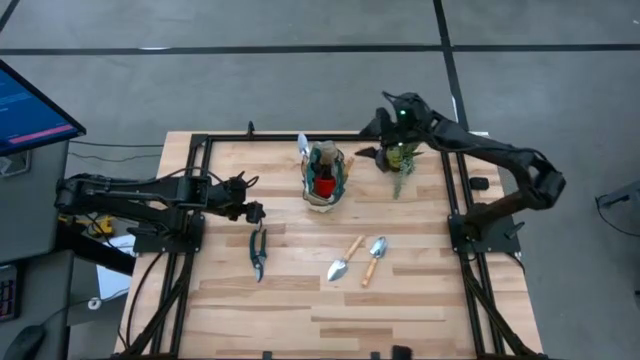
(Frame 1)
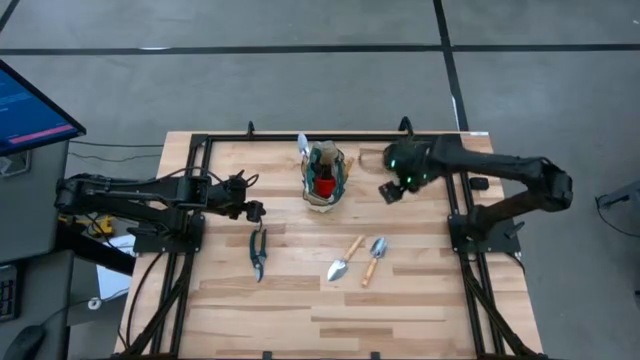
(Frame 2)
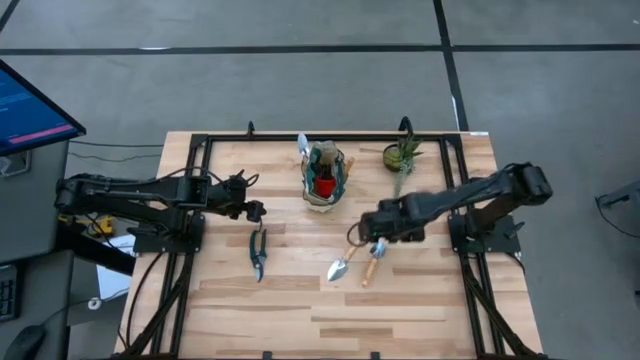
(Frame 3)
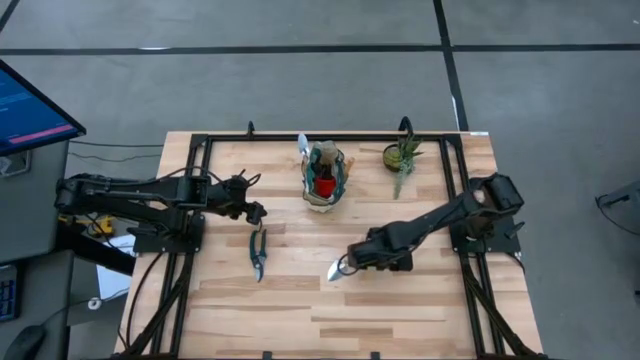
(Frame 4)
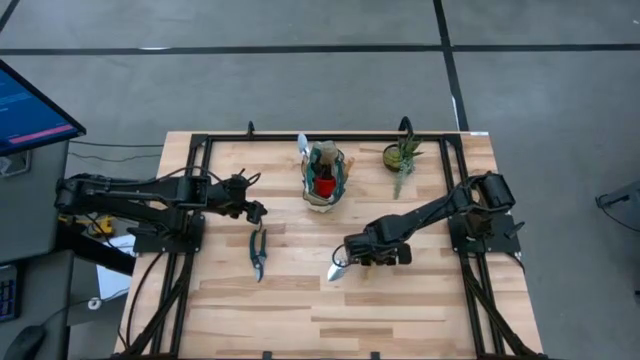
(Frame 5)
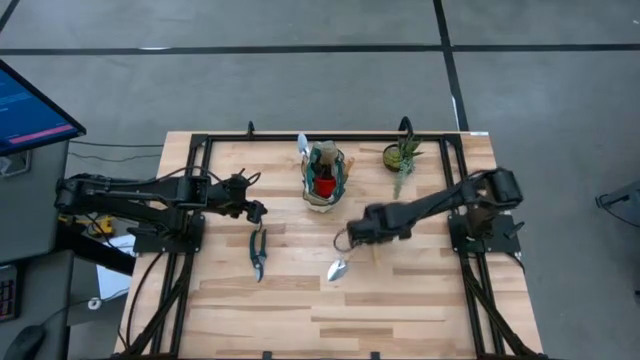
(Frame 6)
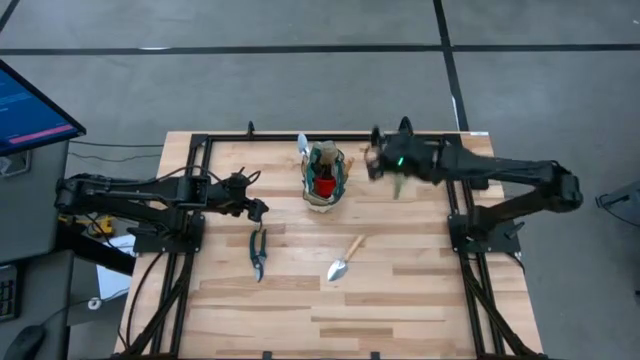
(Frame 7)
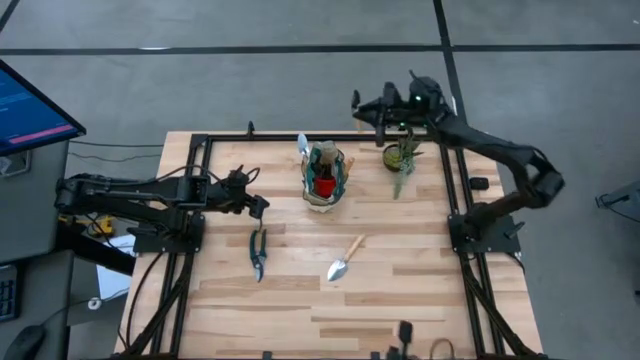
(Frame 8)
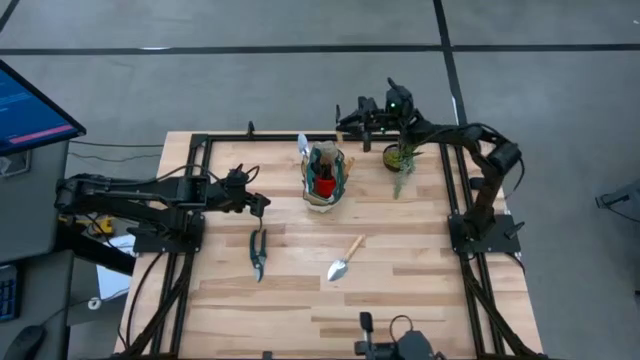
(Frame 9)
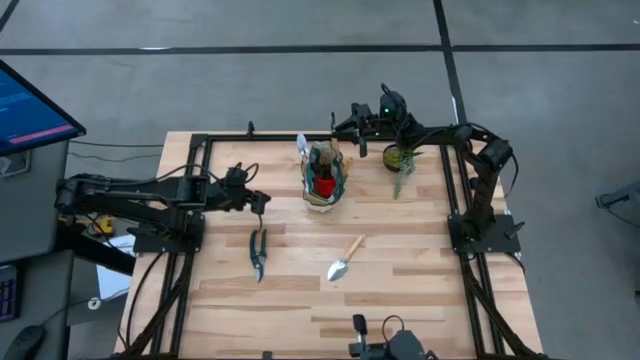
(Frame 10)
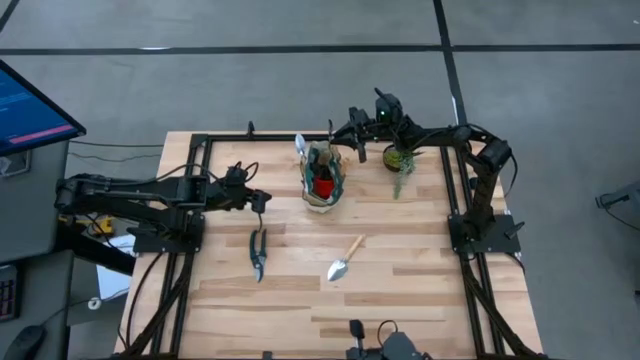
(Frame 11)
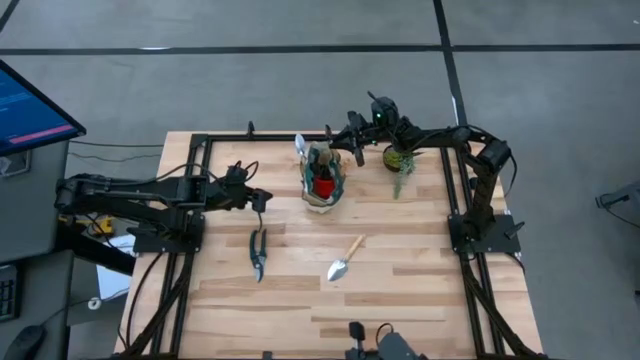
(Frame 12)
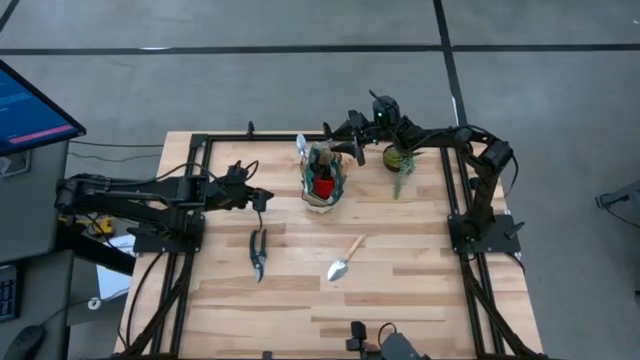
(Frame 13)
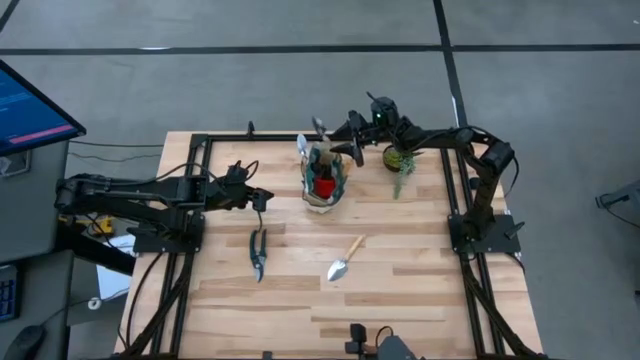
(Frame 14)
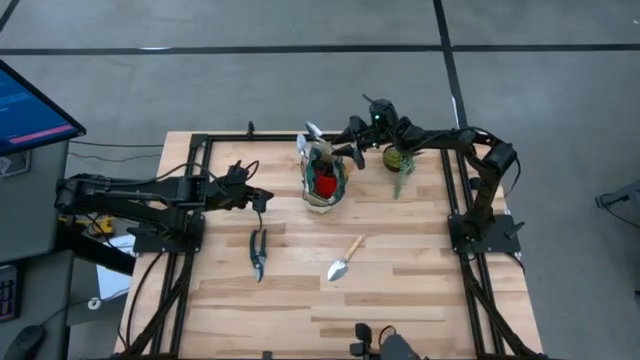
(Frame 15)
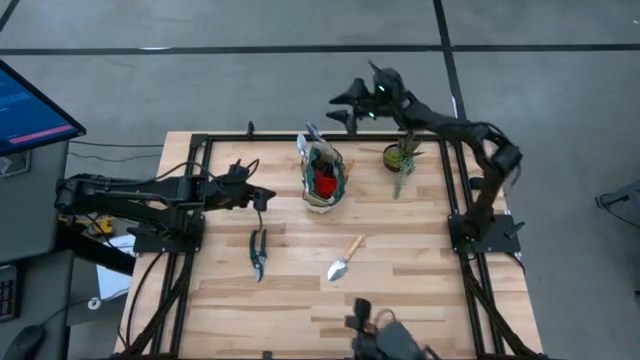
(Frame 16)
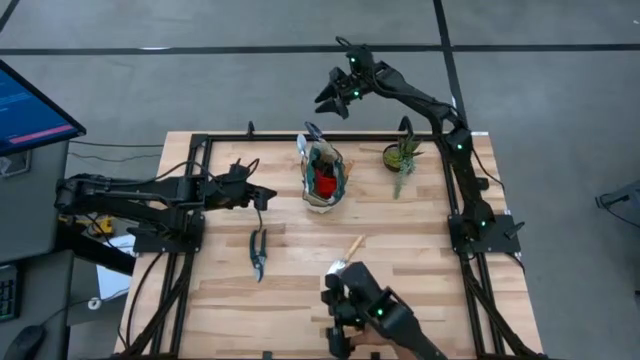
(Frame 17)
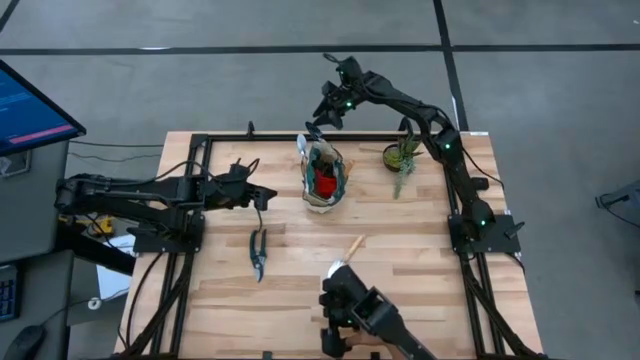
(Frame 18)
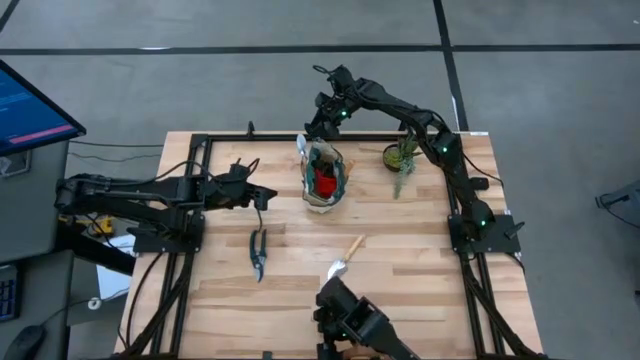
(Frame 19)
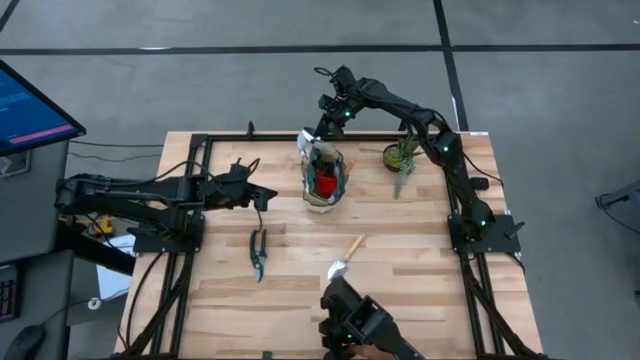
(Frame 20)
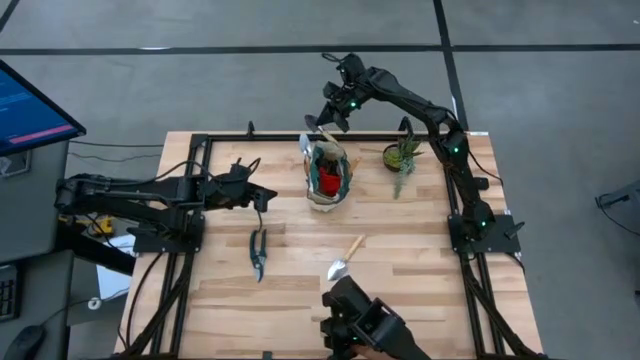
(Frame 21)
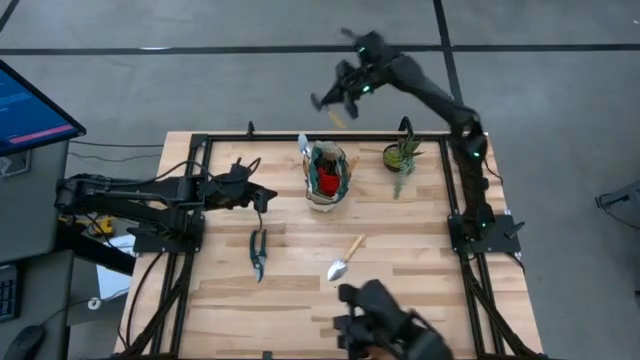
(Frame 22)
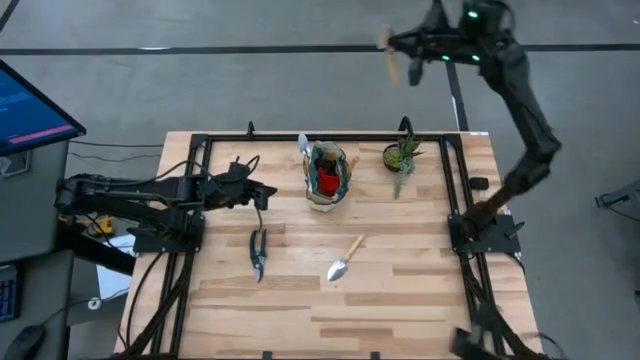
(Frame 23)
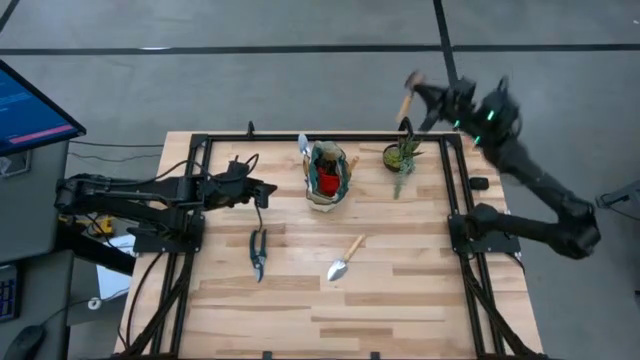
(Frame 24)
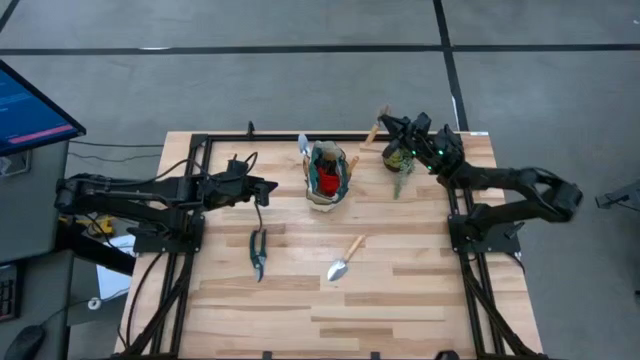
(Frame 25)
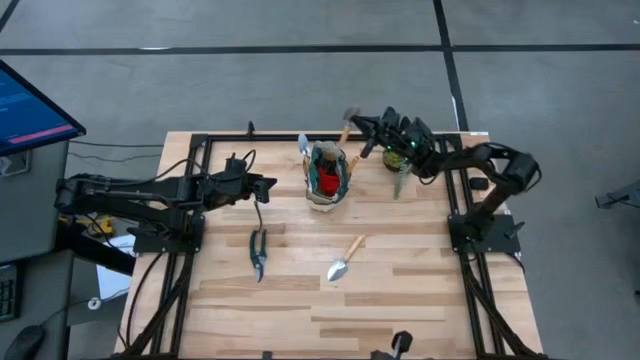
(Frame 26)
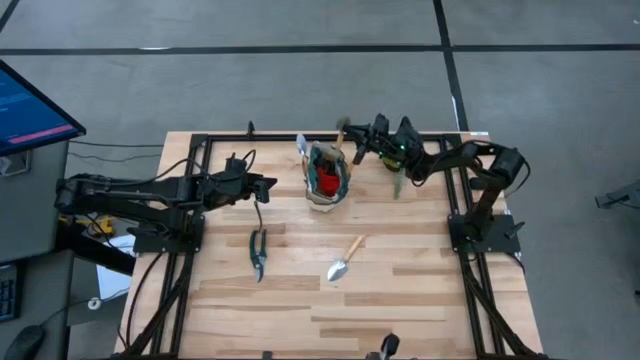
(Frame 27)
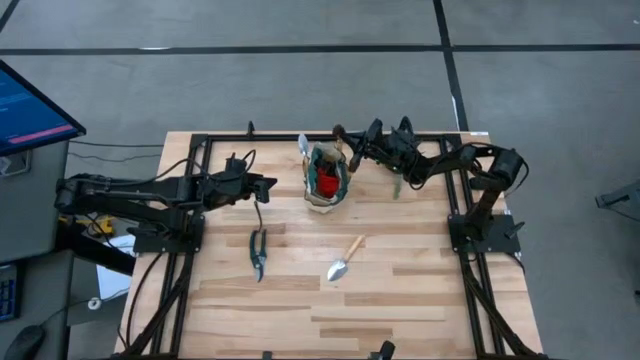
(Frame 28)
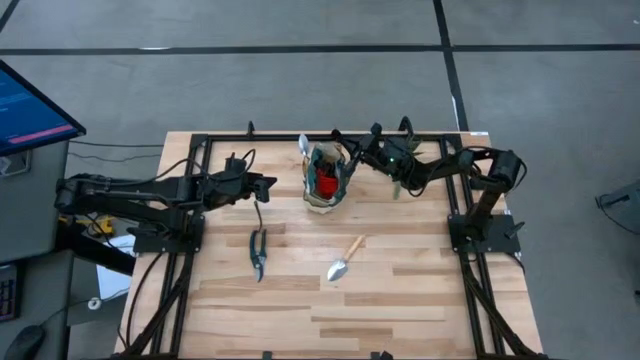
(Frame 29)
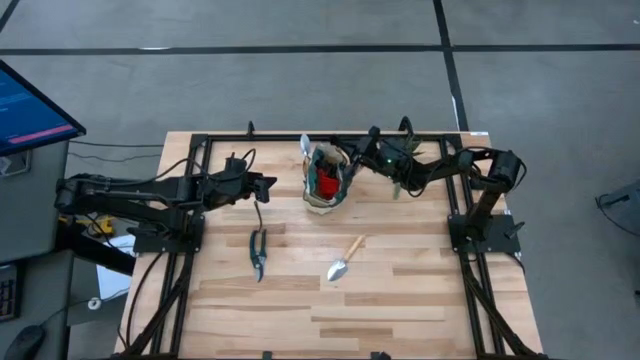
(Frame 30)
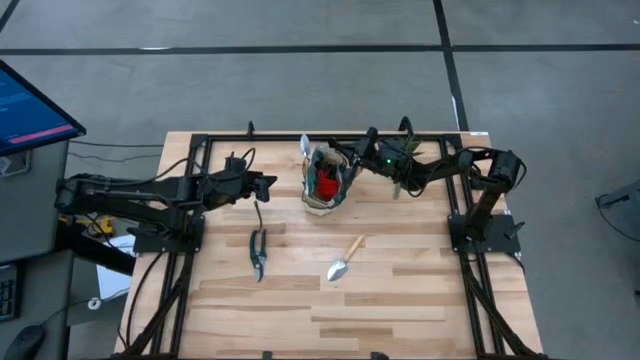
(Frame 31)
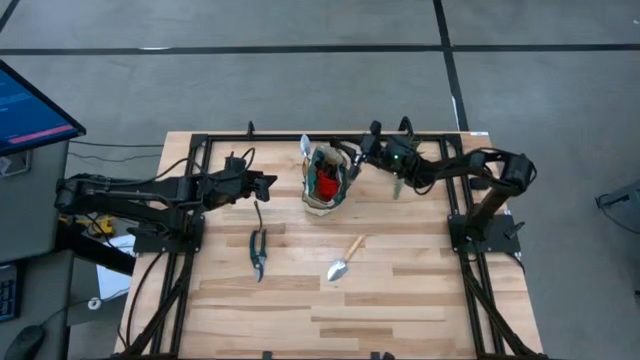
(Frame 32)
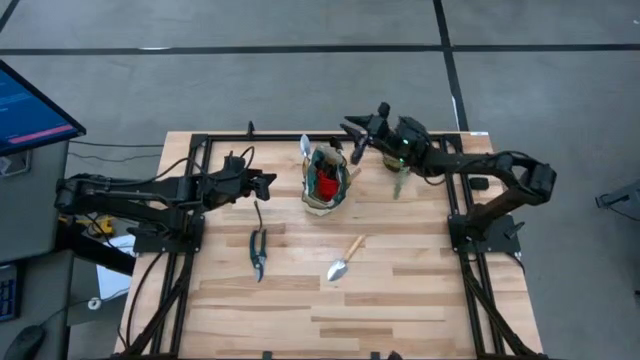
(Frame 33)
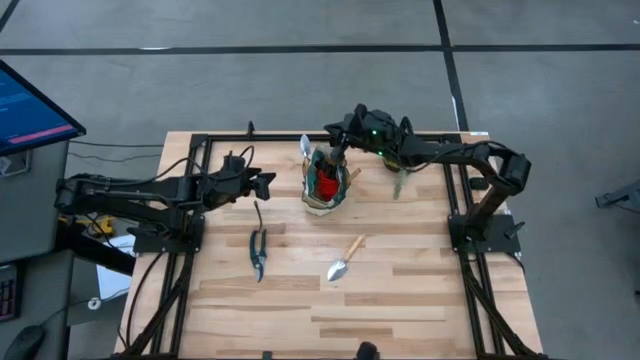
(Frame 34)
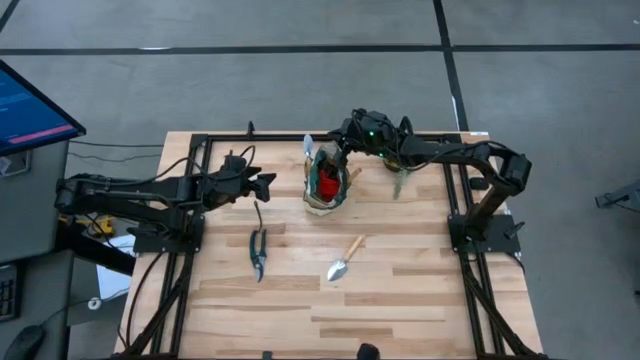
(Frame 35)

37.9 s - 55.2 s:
Task: Pick & Place Garden tools in Gardening bag
Put the brown trowel into the brown gardening bag

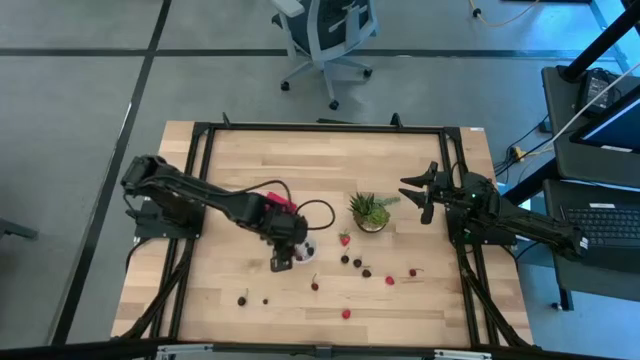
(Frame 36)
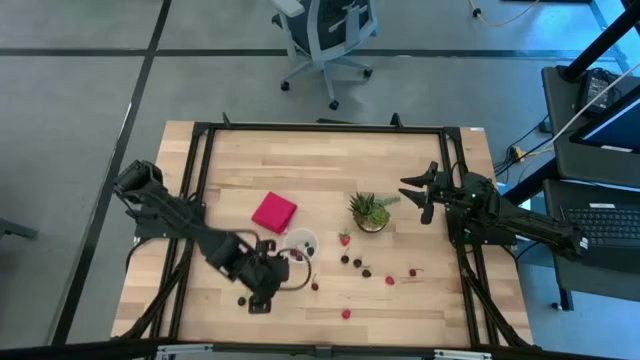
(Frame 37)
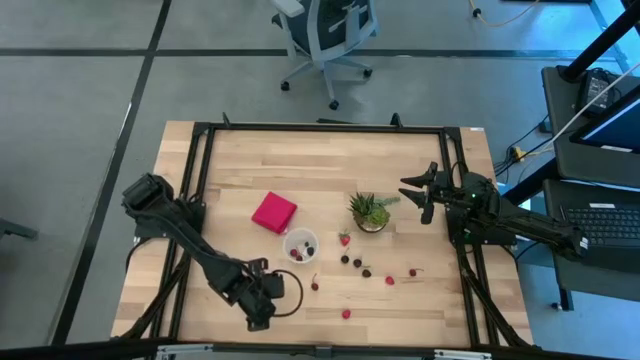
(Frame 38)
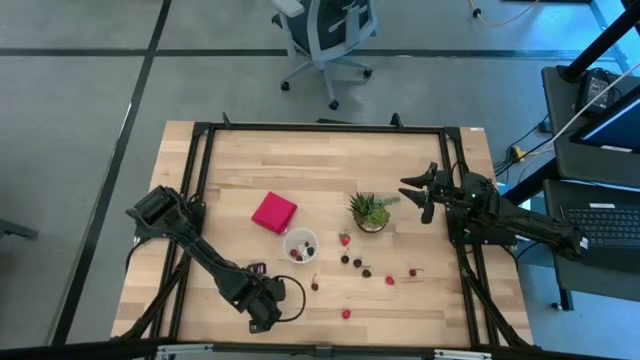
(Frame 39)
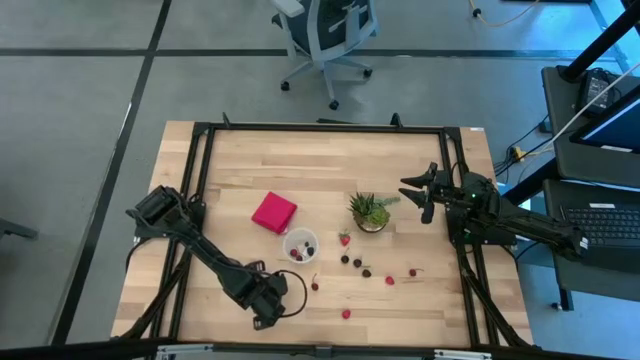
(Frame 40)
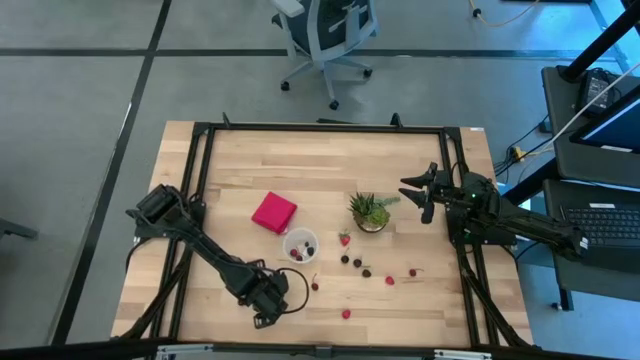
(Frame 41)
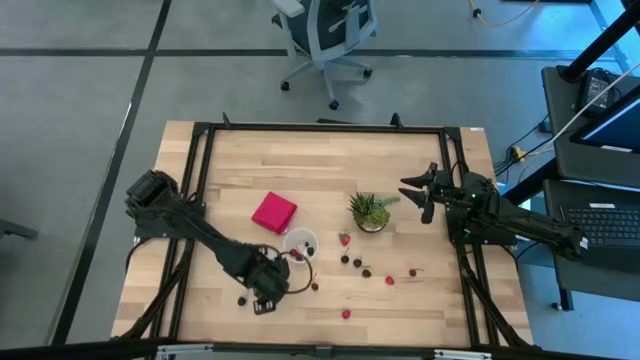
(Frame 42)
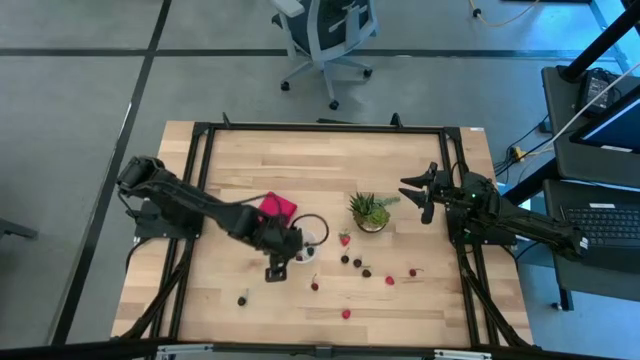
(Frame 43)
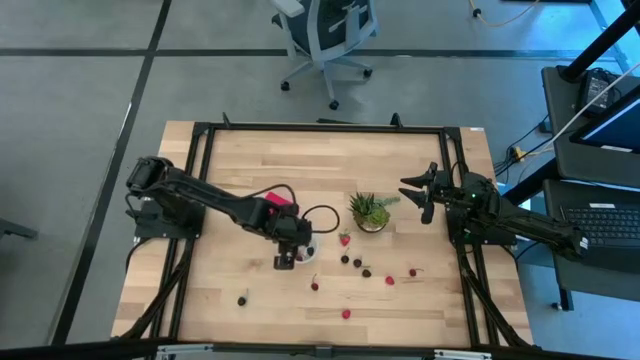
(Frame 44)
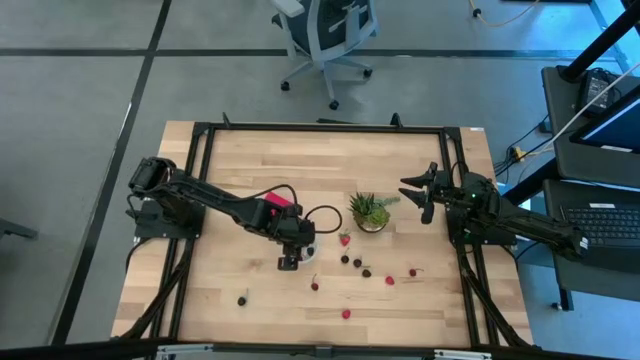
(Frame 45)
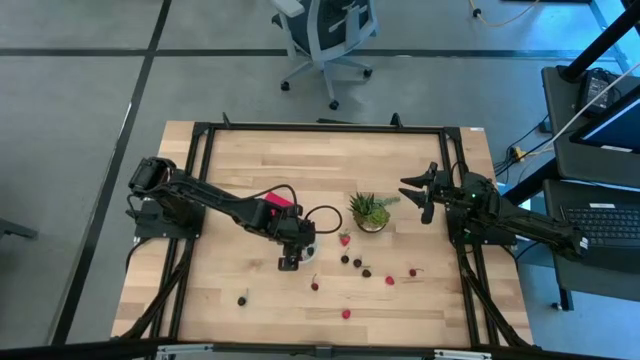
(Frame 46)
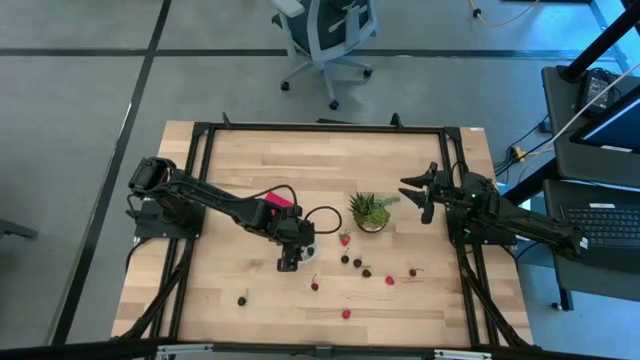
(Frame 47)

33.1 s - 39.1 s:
Task: Pick and placing Produce into tupperware
Put the blueberry into the container
